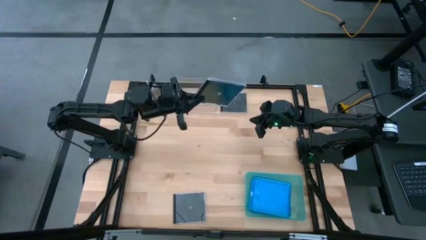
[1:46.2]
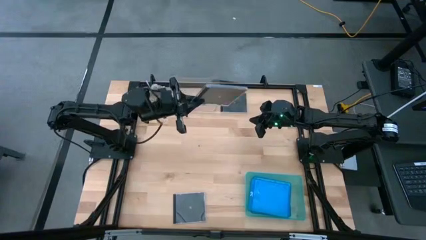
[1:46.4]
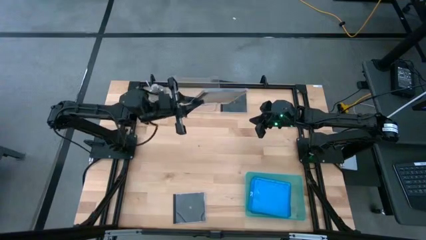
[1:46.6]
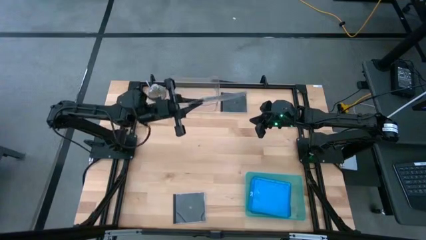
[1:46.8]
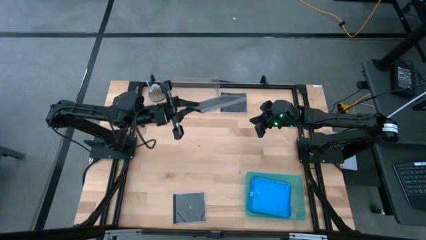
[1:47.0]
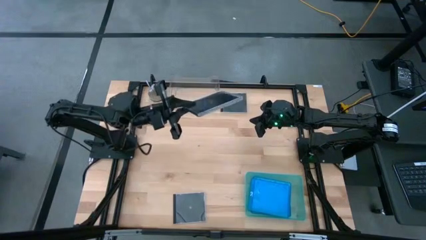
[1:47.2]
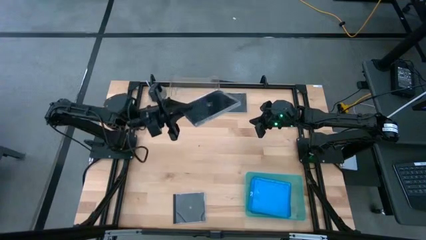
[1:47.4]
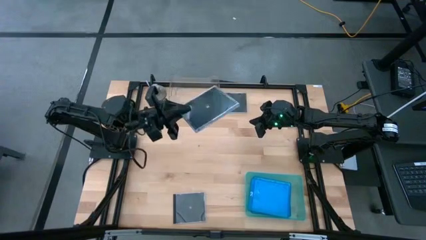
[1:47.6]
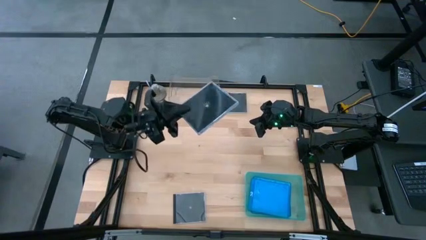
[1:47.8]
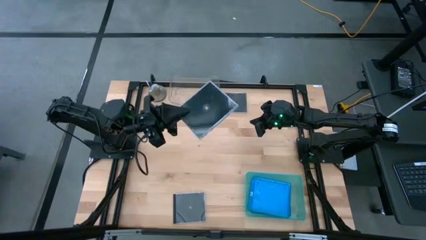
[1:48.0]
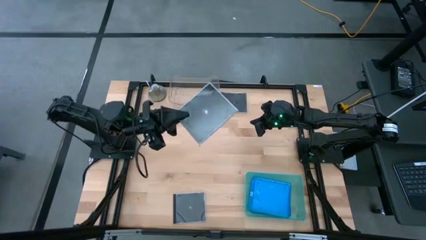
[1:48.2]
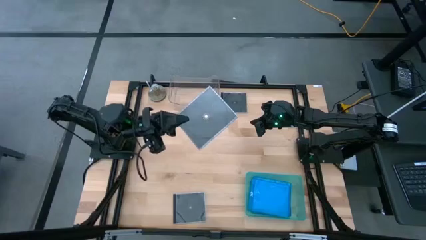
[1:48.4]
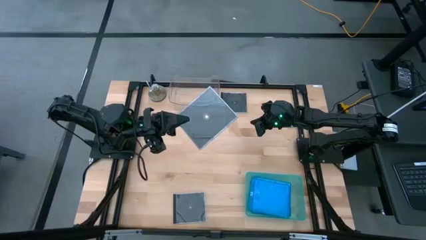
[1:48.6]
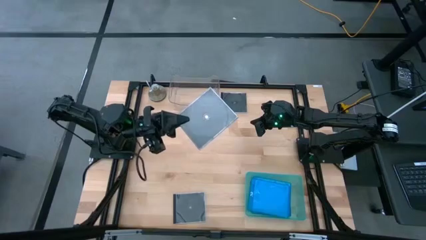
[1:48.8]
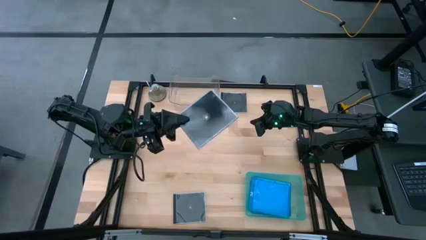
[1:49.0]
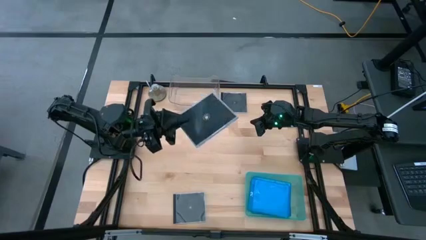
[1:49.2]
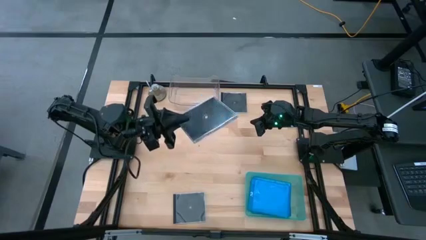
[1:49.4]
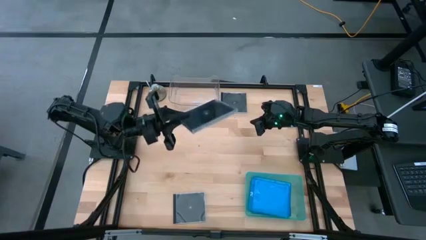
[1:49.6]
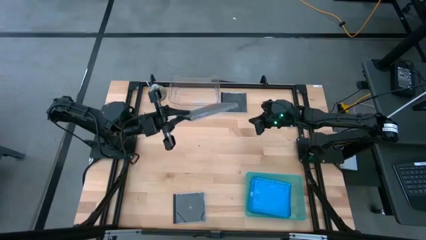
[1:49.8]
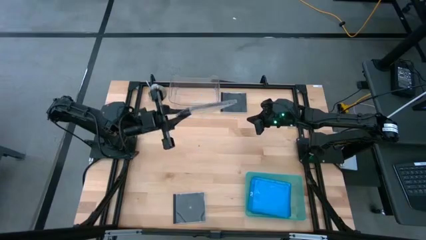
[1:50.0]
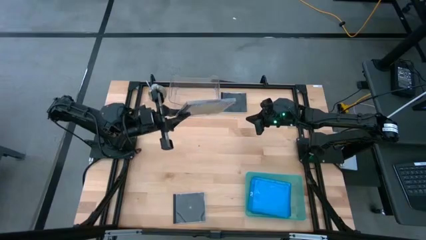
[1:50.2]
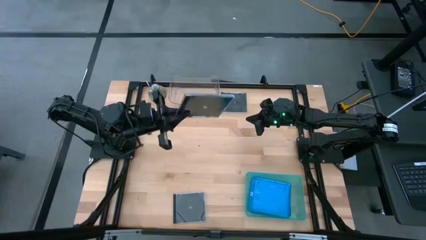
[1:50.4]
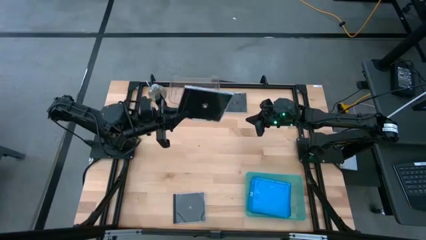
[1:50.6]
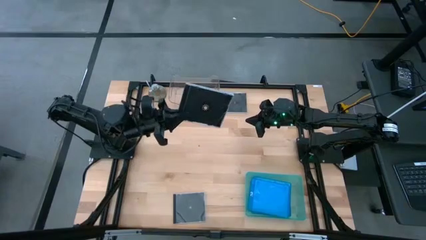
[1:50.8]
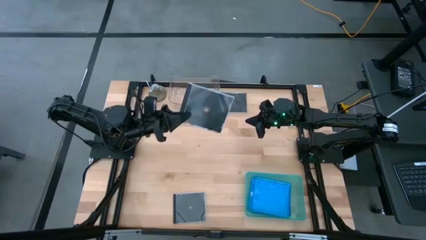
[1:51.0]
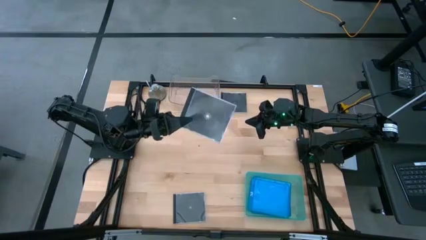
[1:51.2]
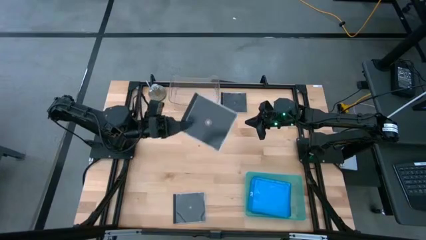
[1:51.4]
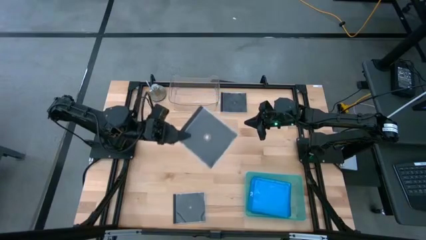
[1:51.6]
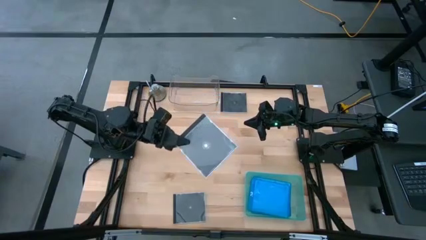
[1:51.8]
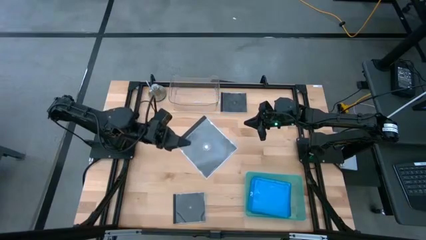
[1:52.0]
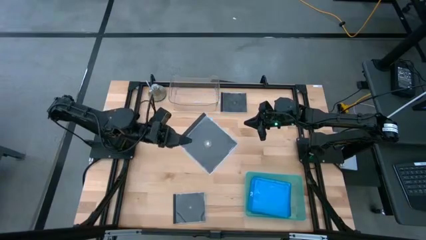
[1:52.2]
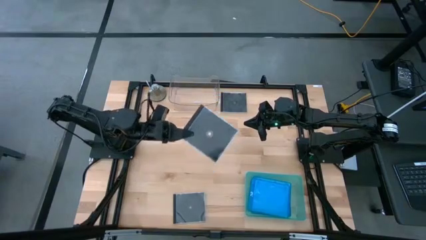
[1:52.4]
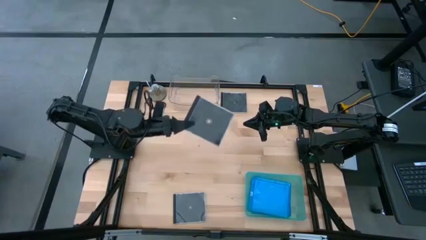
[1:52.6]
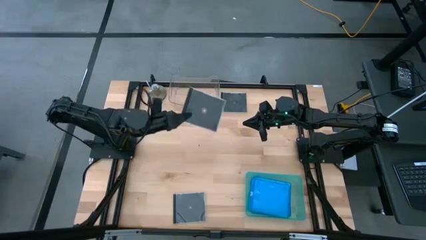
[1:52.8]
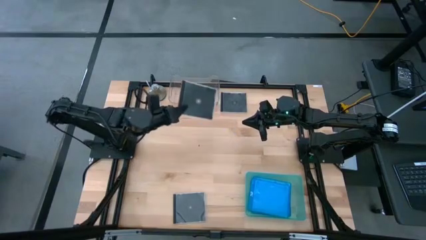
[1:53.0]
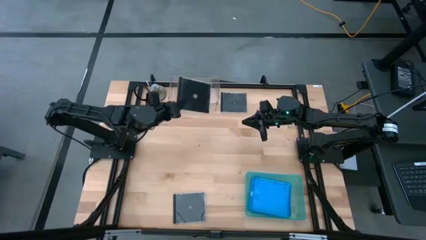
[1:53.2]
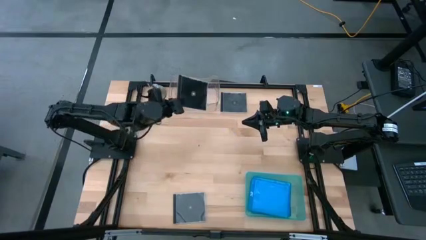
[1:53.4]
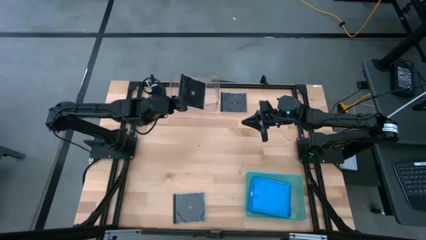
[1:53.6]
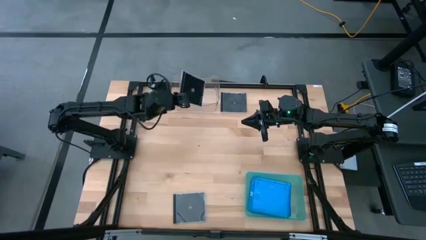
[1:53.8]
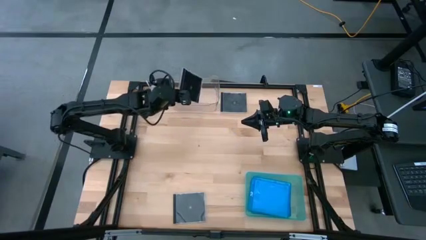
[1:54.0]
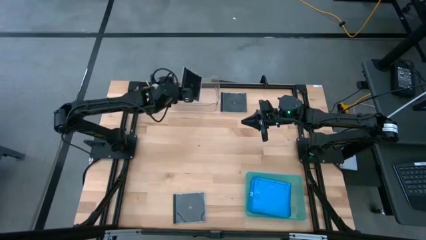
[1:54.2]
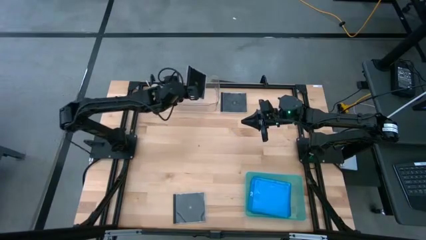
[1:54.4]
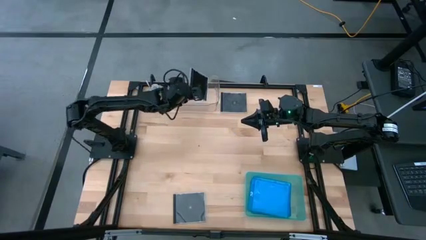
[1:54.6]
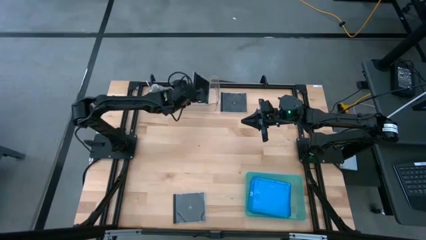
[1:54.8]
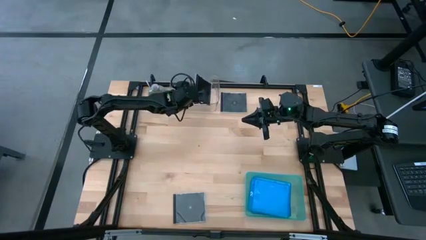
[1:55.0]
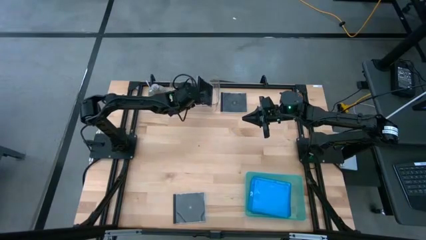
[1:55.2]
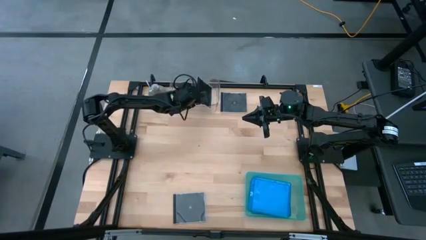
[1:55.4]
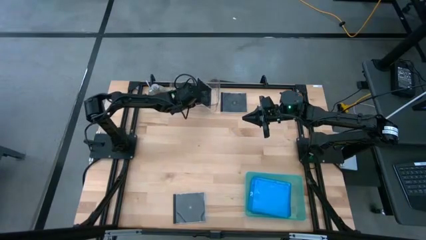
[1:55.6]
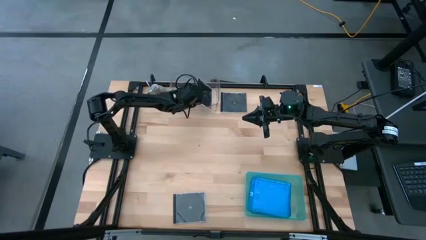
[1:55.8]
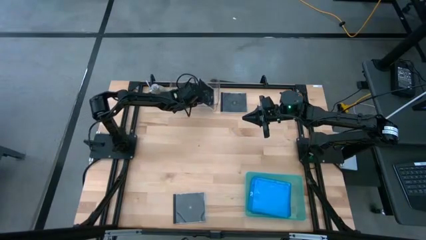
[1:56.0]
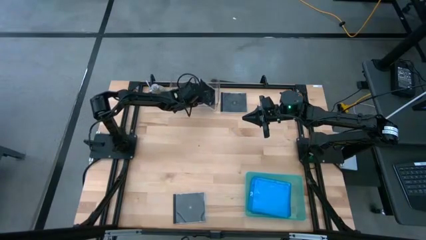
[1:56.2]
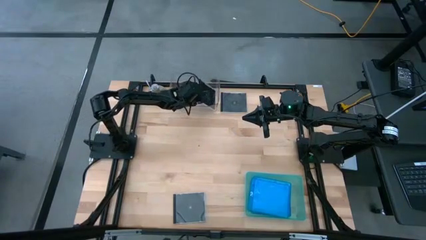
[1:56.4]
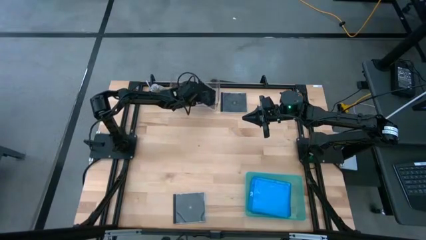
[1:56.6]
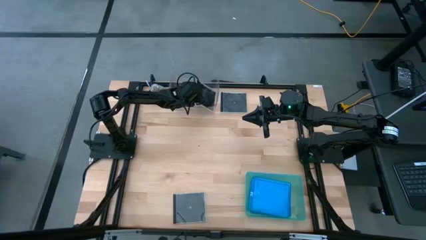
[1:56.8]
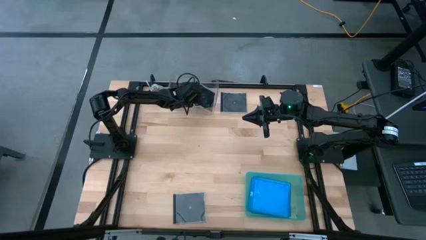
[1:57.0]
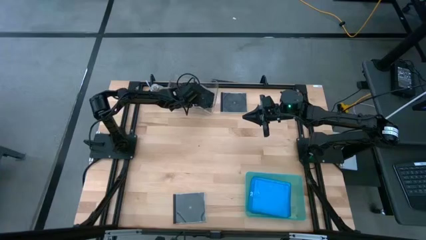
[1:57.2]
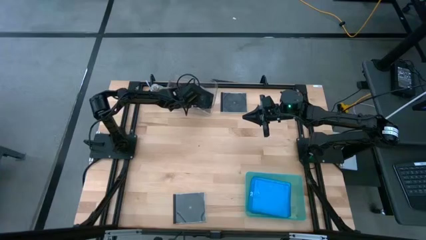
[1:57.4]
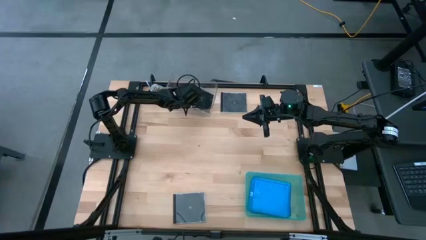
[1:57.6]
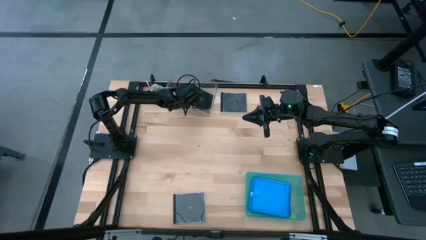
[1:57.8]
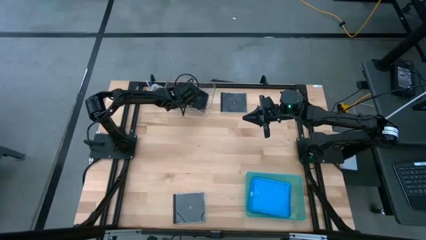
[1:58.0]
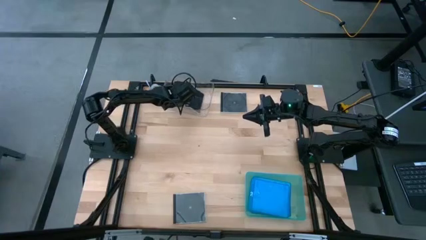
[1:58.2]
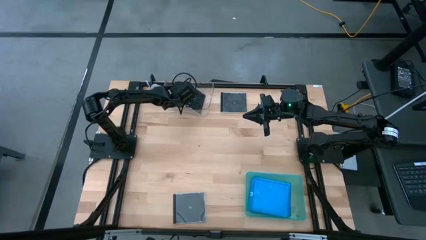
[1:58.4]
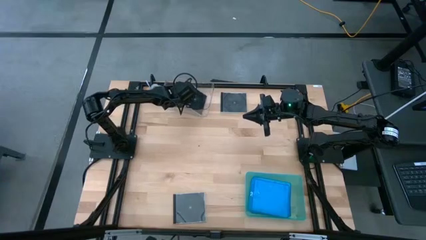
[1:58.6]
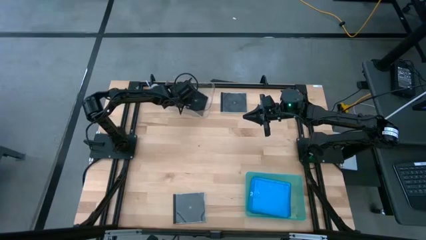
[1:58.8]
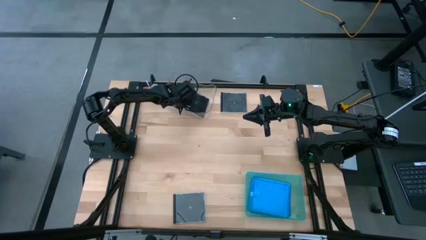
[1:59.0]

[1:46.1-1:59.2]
Task: Pick & place jewel cases by type
Put the middle black cd case into the transparent bin

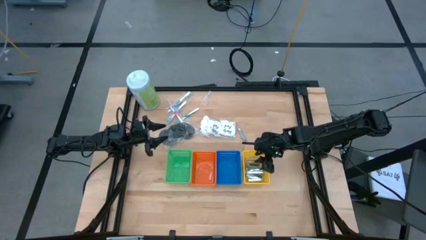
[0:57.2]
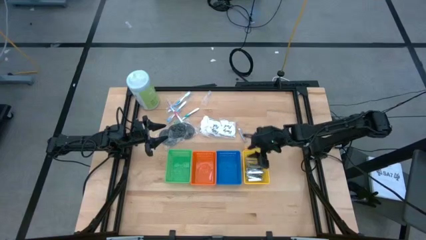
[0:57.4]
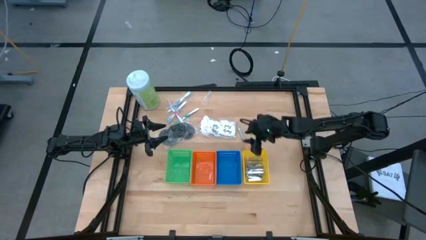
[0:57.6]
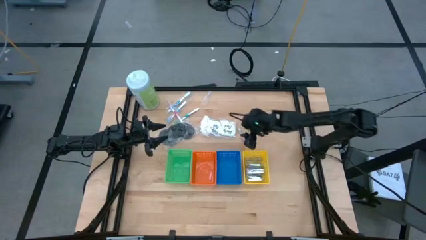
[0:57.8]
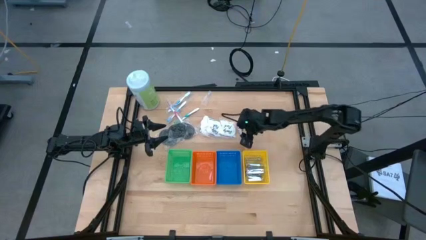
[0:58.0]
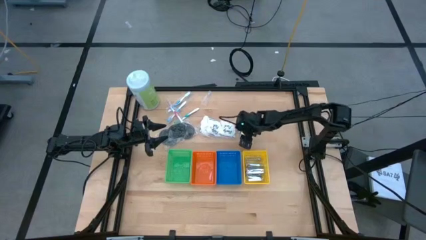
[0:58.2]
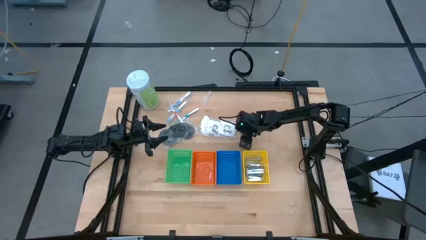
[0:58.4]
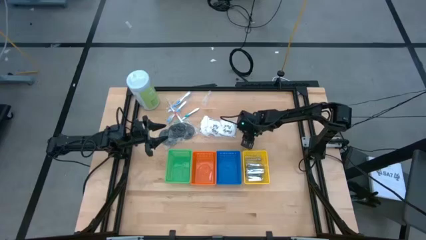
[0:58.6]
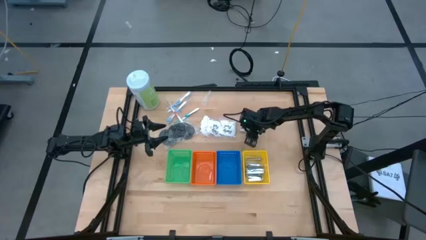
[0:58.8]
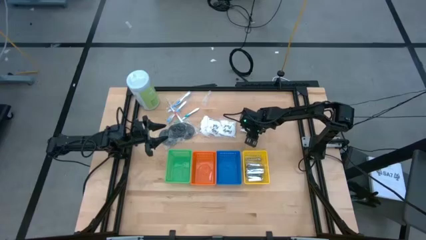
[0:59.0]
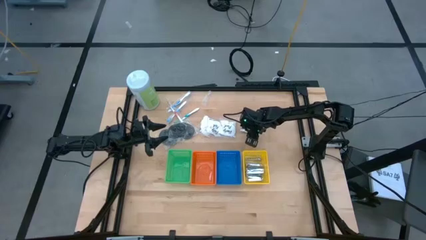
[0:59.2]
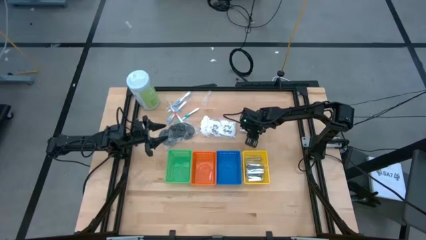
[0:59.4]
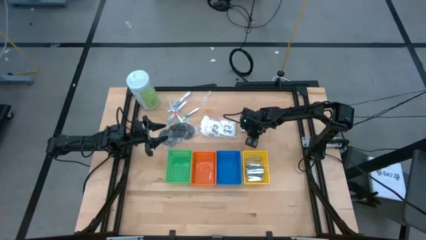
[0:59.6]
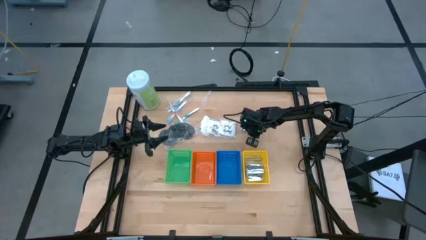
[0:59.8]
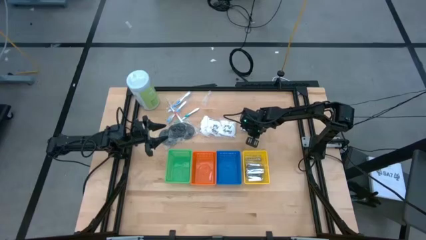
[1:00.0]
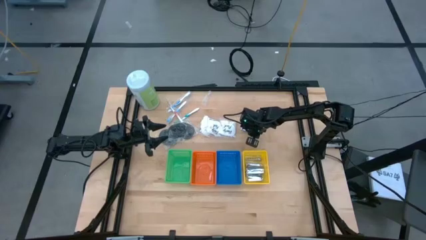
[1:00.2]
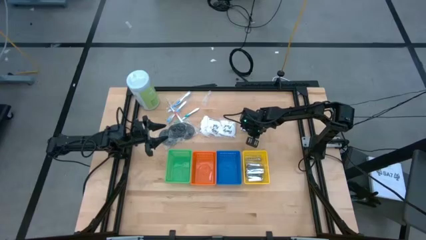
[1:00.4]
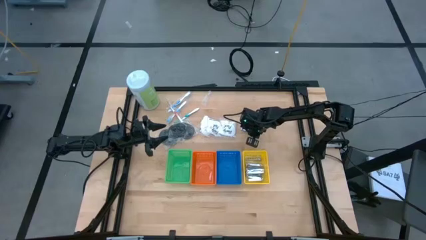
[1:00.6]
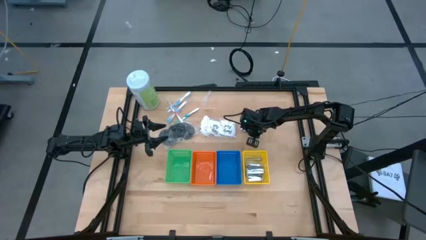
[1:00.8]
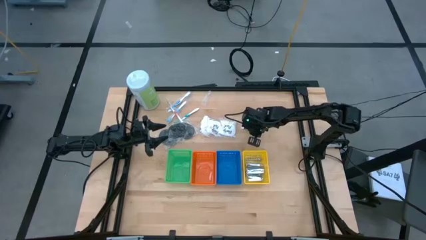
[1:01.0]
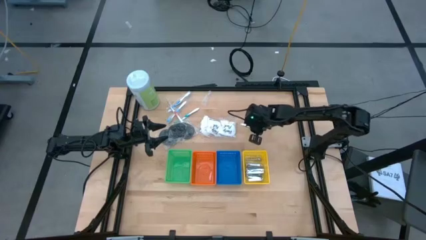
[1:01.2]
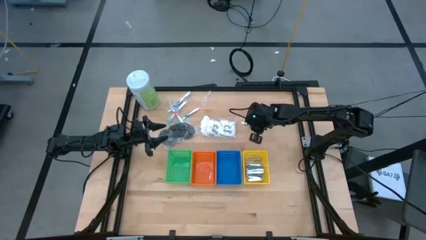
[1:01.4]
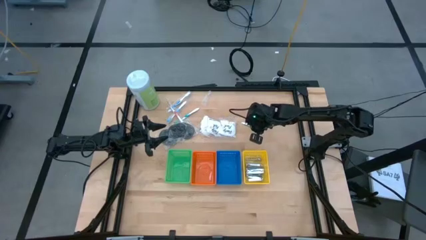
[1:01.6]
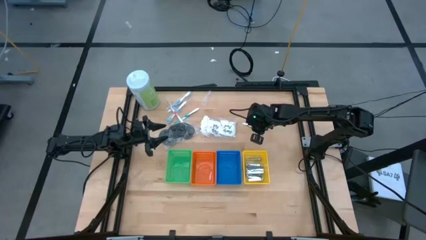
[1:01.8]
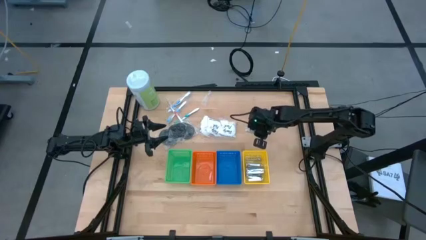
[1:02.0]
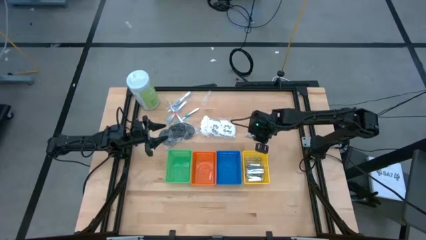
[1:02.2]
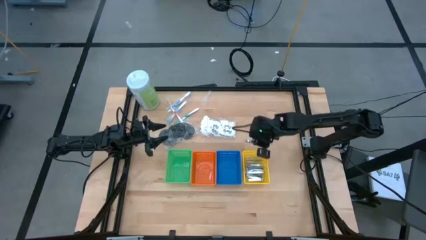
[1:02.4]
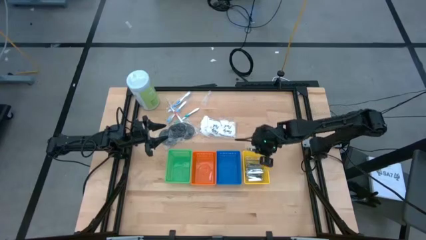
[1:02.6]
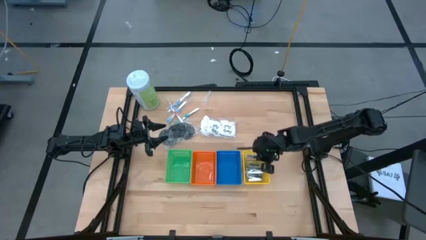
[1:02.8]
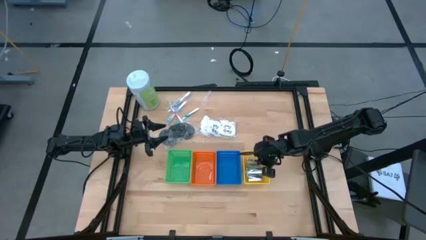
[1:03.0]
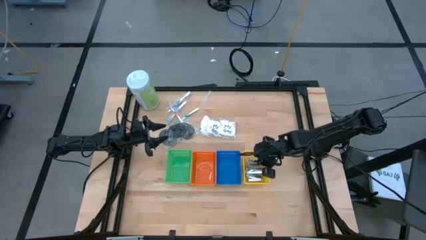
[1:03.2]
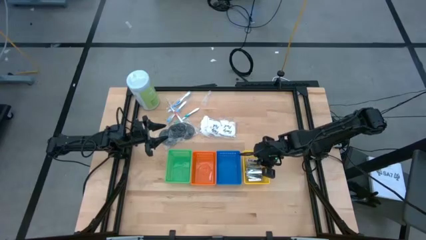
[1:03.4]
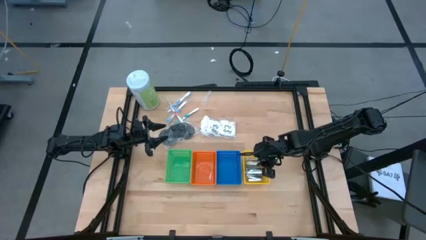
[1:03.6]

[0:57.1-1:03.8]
Task: Pick & Place Travel size toiletries
Put the silver nail cutter into the yellow basket
